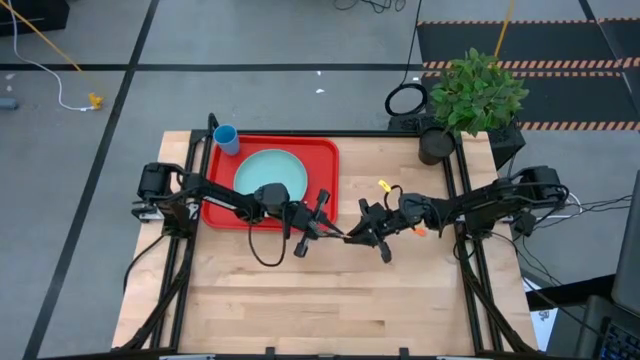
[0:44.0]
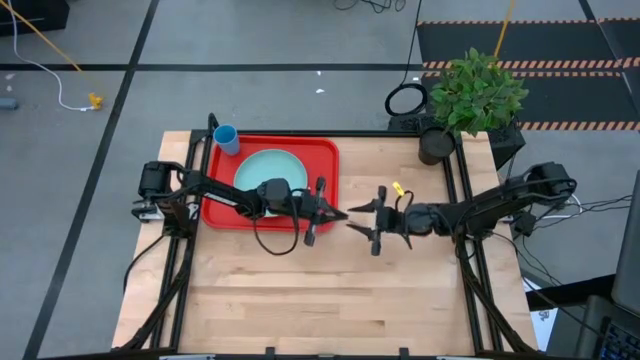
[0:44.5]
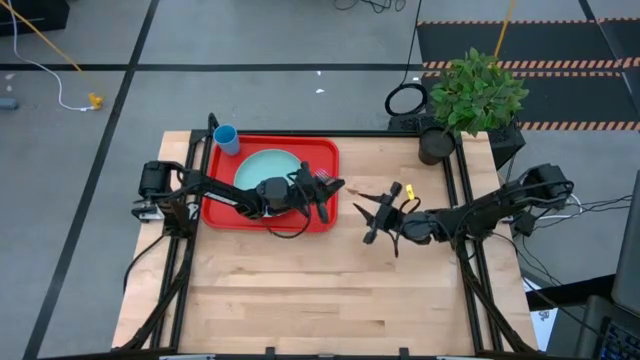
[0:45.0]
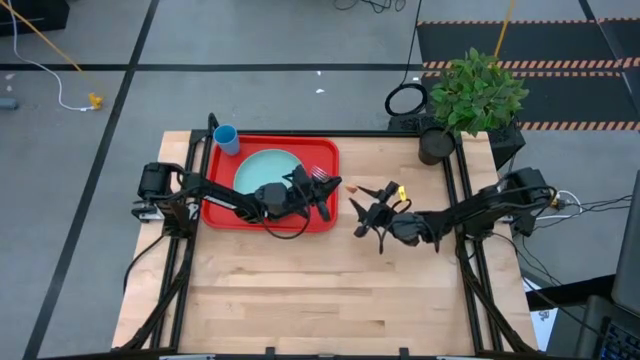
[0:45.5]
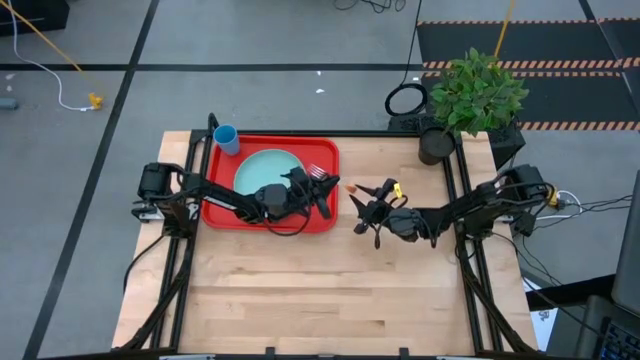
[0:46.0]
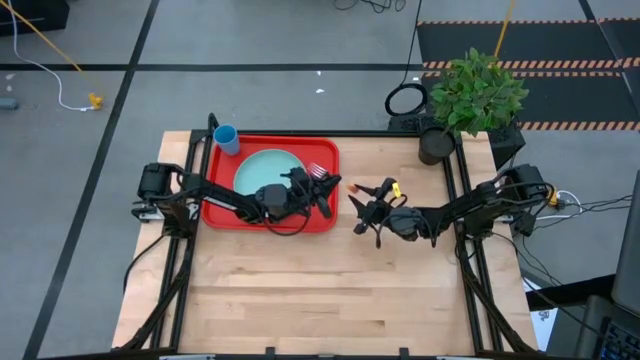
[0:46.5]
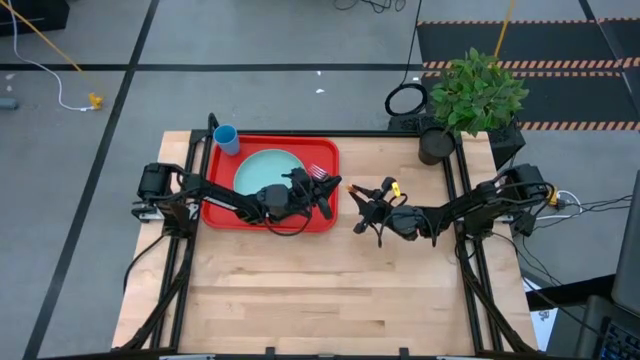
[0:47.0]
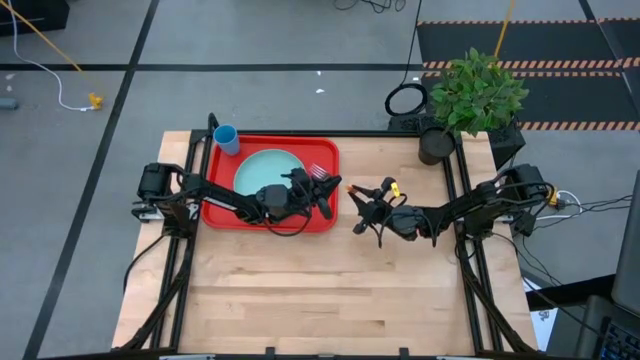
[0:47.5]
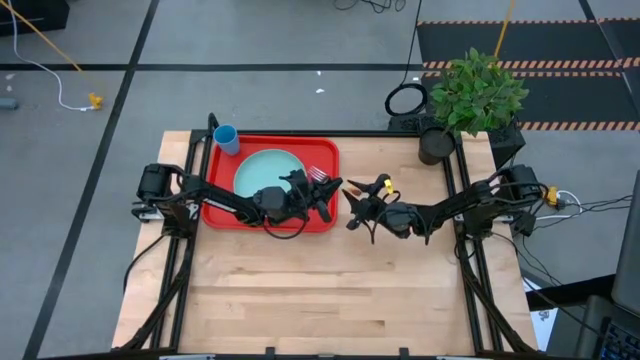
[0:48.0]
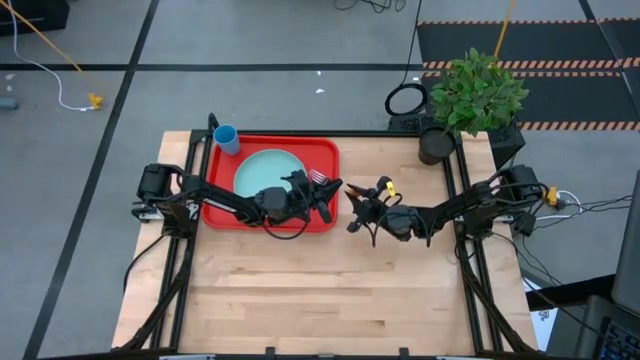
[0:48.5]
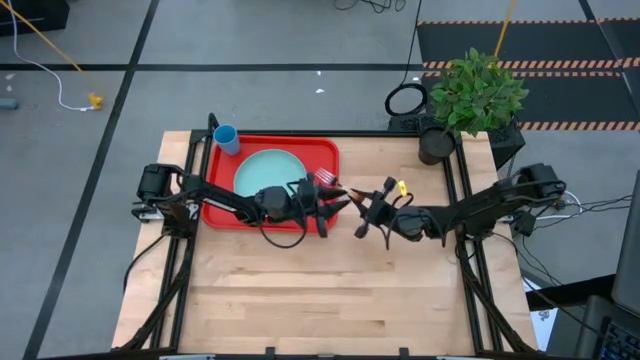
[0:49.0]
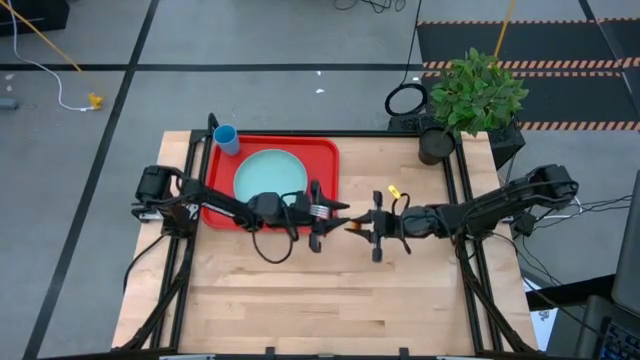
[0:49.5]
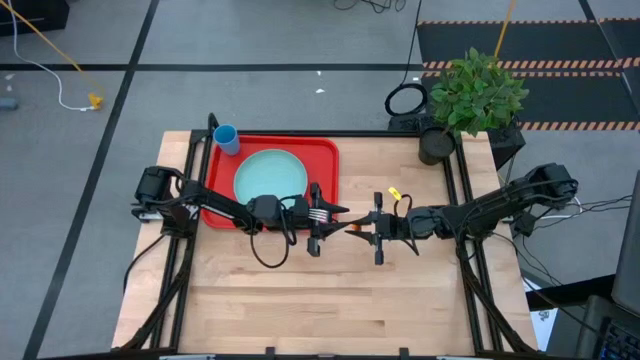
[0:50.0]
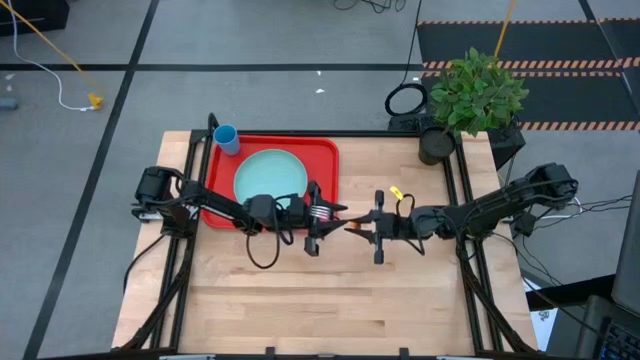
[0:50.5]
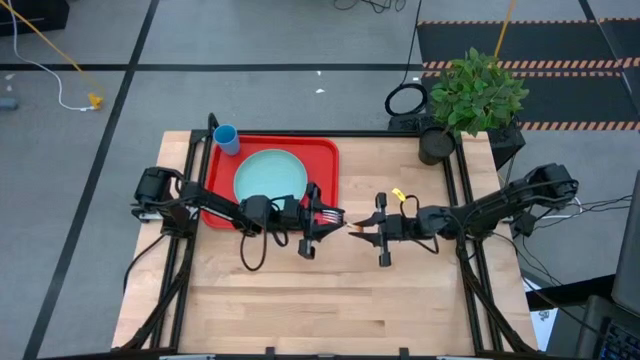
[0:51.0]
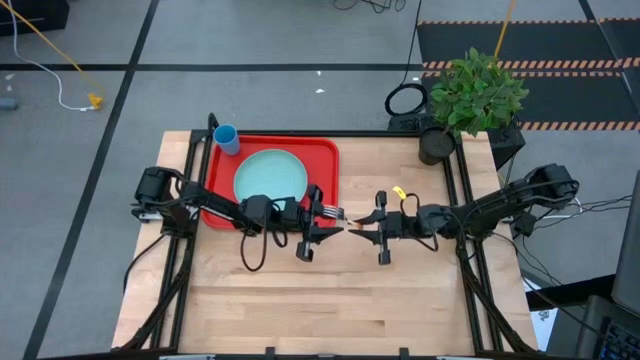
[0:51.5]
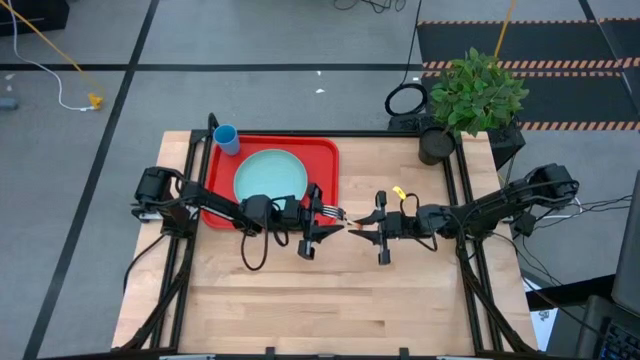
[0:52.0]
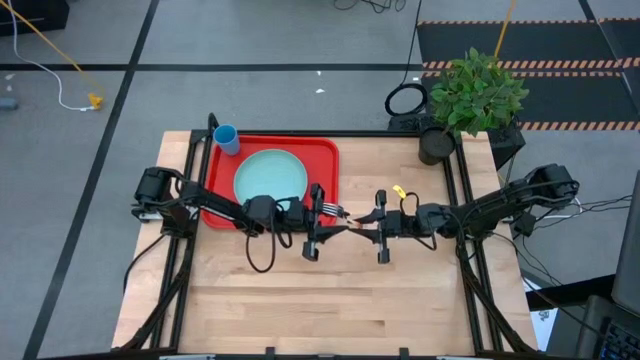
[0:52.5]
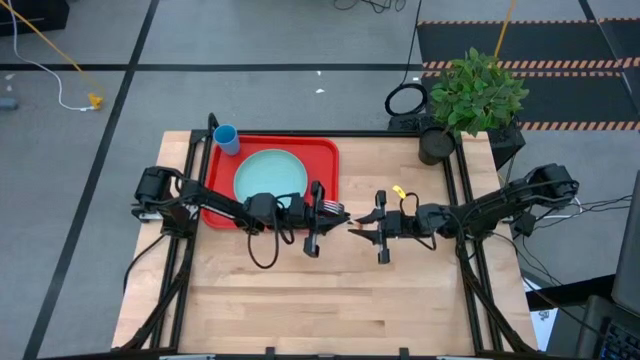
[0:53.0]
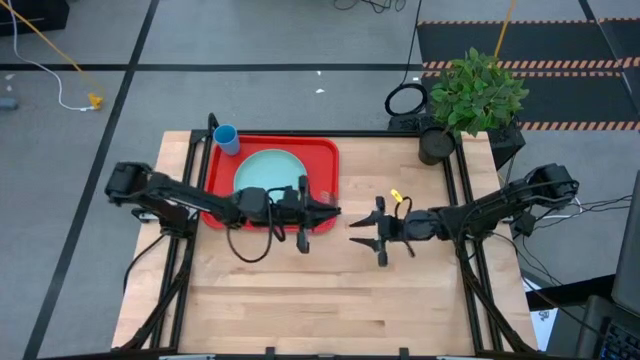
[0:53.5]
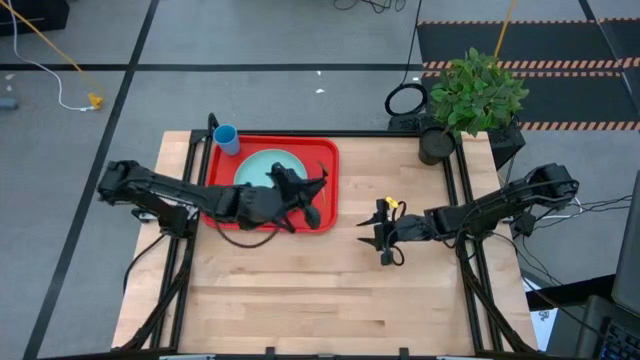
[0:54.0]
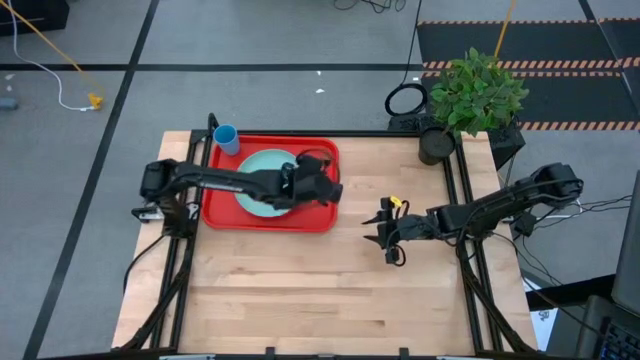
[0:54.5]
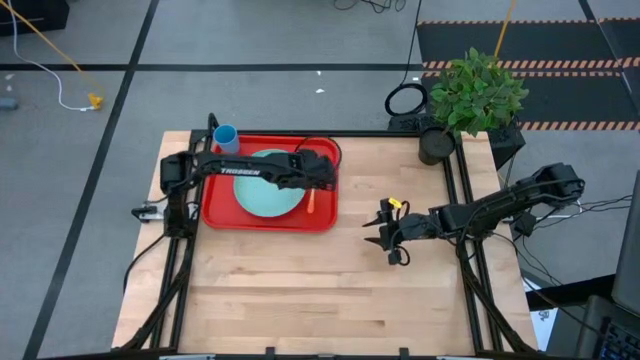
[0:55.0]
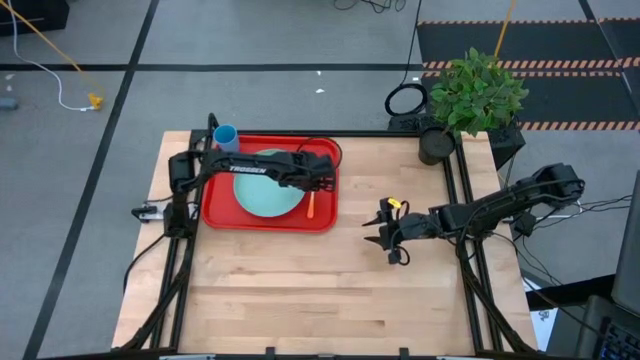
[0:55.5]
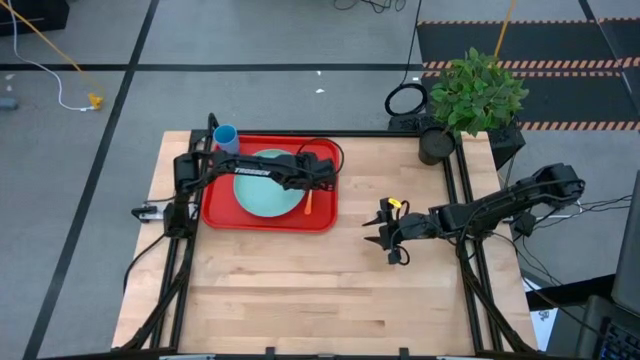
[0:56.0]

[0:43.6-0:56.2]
Task: Pick and place plate/cup/fork/spoon on tray
Put the orange fork on the red serving tray to the right of the blue plate

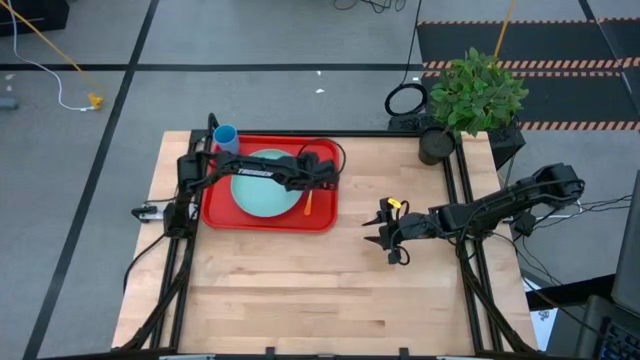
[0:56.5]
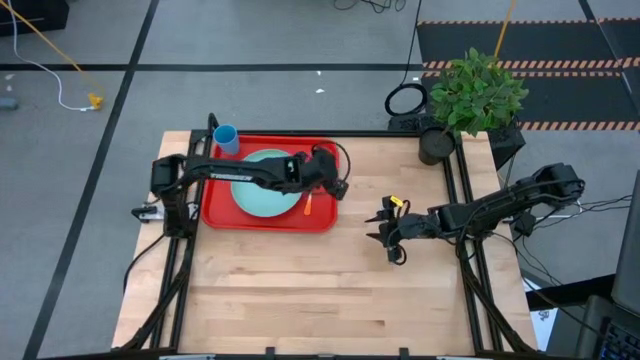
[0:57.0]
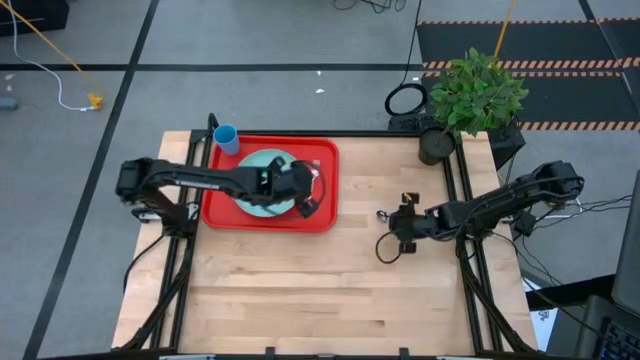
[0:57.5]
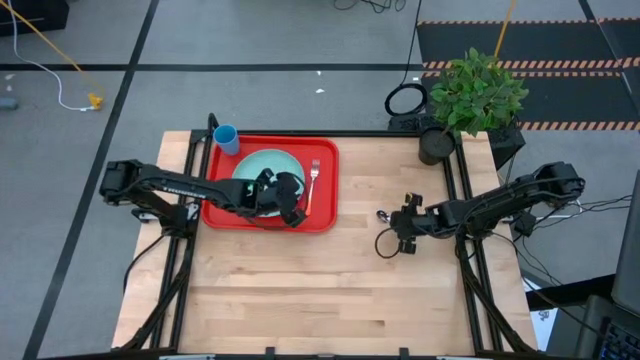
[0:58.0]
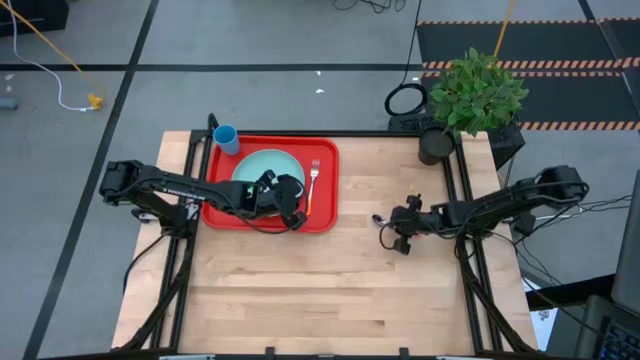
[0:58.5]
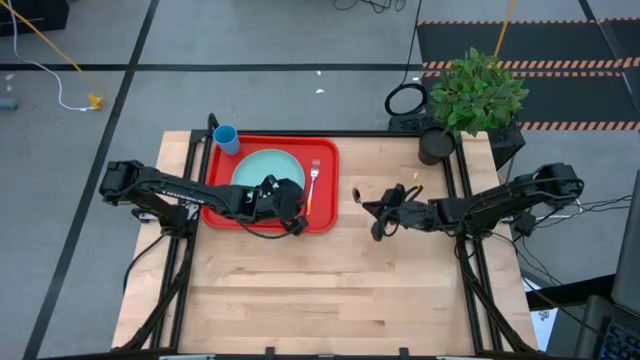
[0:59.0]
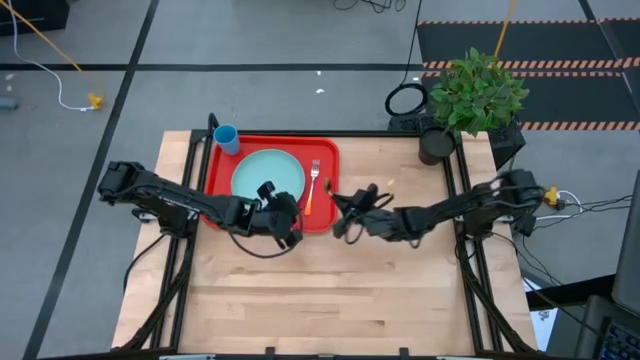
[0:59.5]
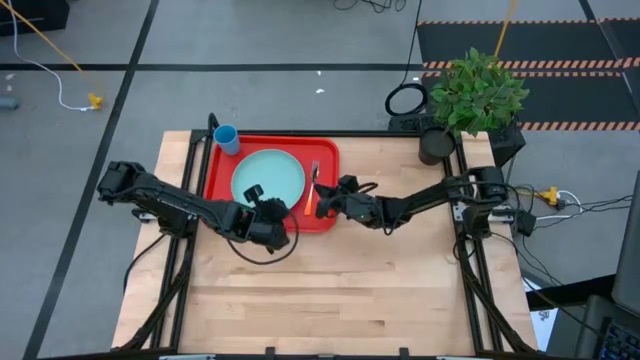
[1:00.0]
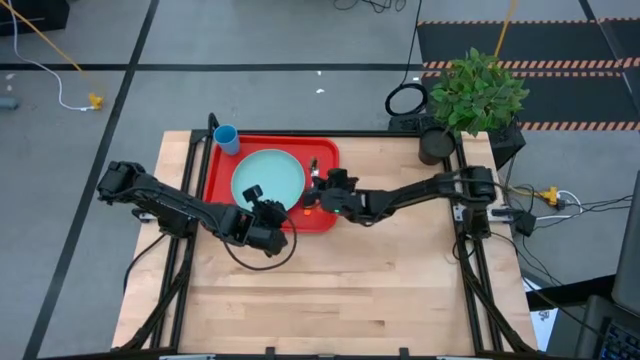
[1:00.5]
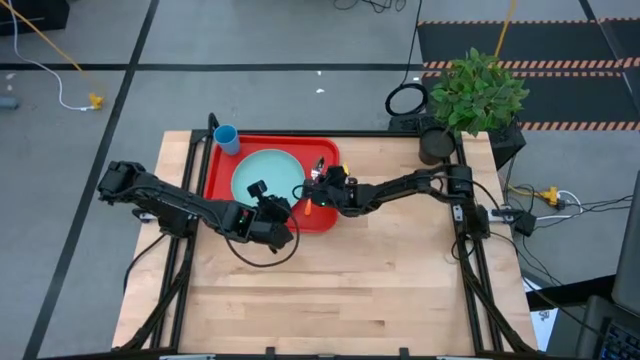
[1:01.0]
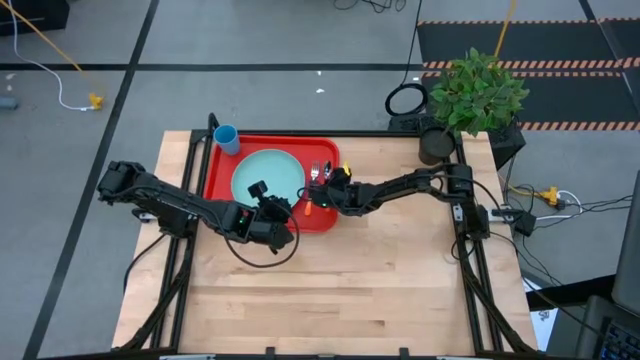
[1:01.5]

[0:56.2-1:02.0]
Put the orange spoon on the red serving tray to the right of the orange fork

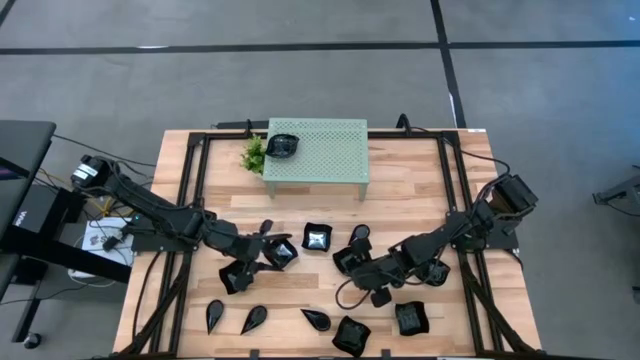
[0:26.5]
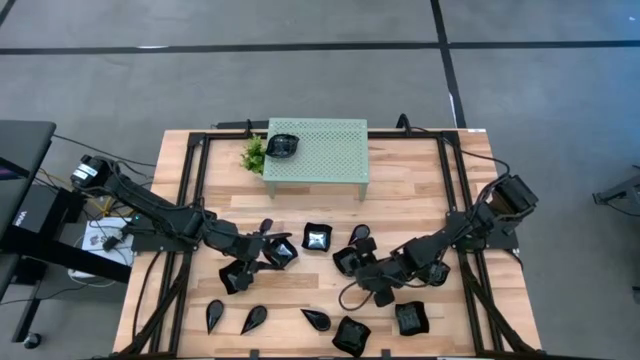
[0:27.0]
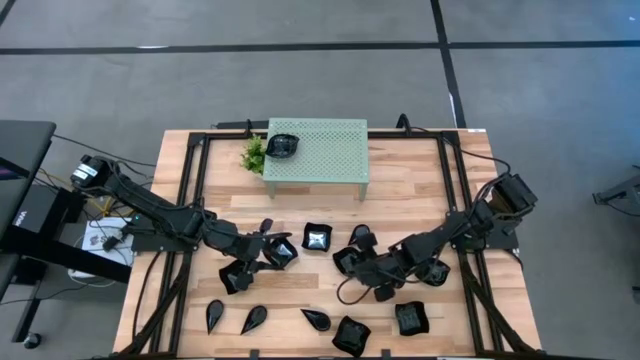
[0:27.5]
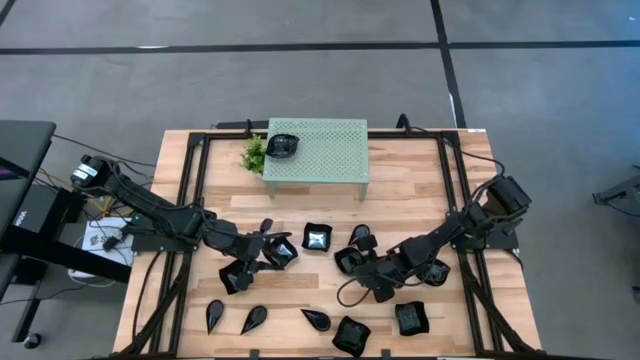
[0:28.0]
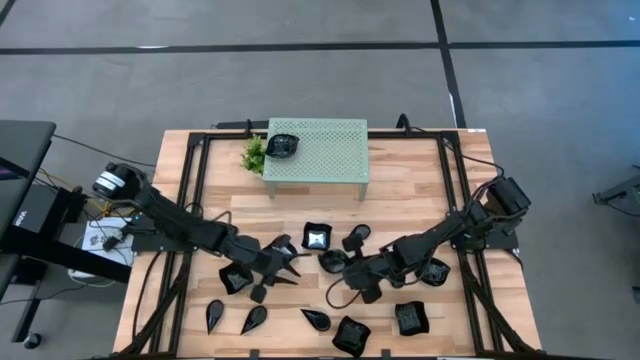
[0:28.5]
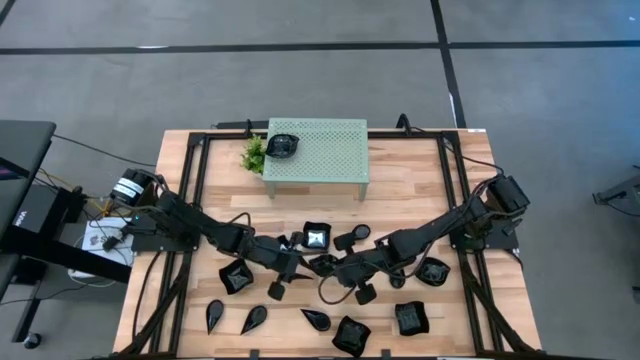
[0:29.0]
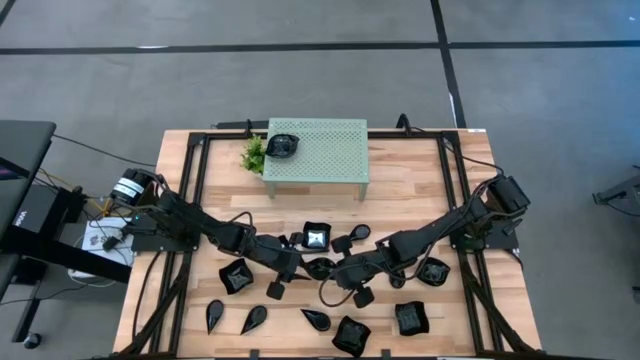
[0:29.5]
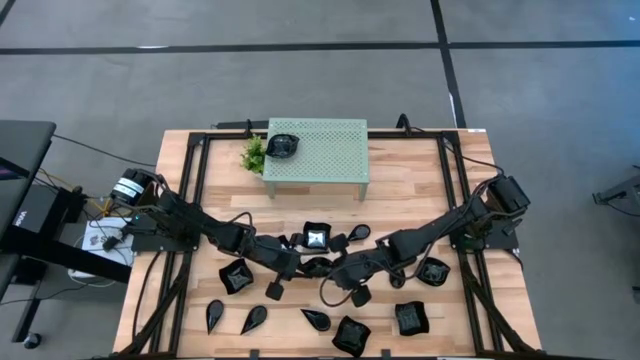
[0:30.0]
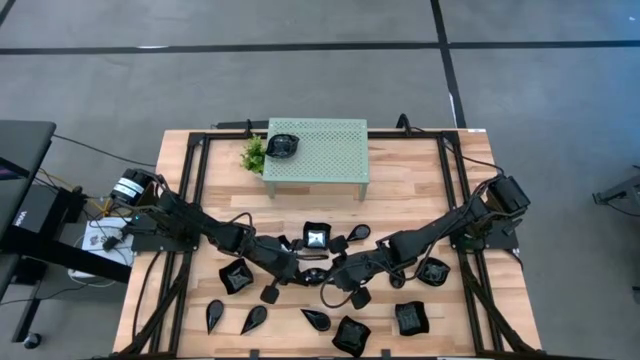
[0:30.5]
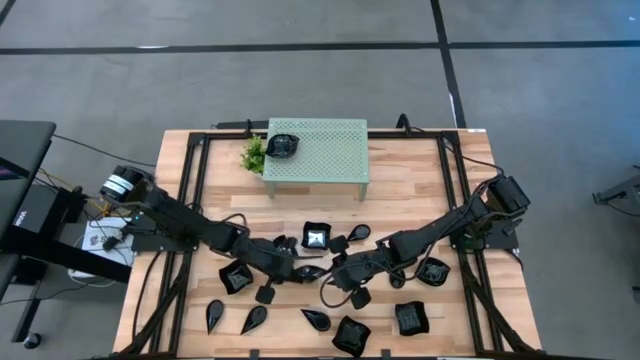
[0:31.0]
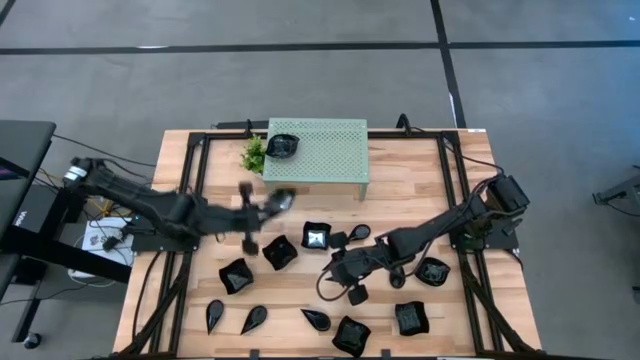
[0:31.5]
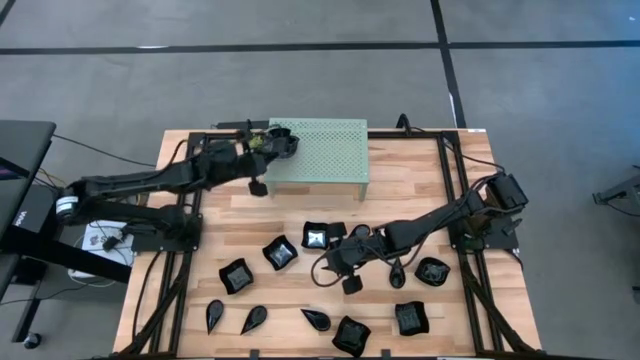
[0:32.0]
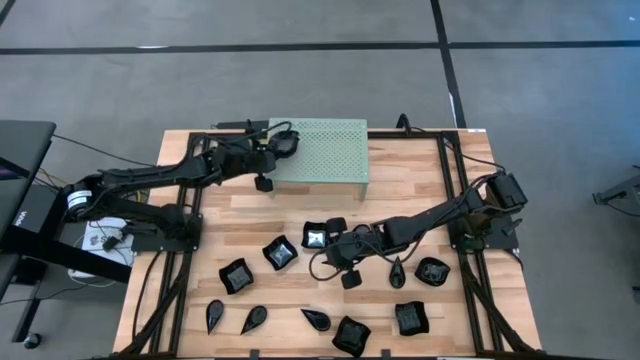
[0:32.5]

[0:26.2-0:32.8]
Task: Pick & Place Mini shaped plates
Stack the leaf-shaped plate on top of the other leaf-shaped plates on the shelf
